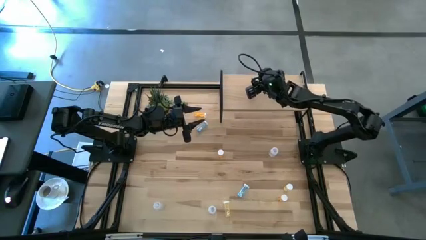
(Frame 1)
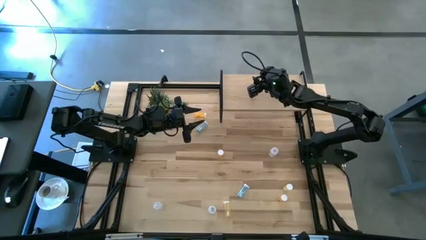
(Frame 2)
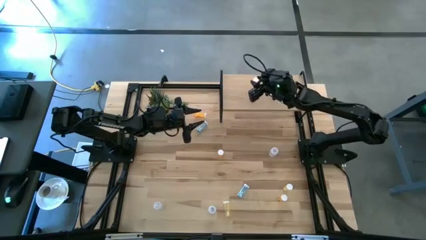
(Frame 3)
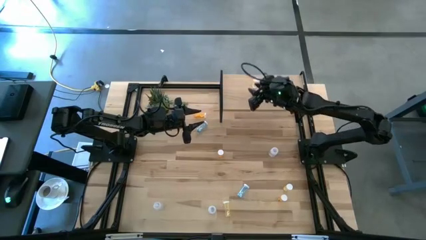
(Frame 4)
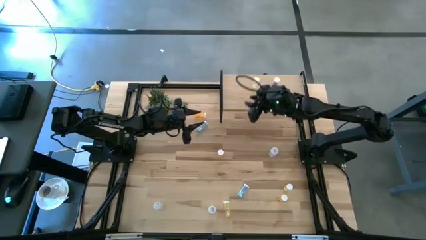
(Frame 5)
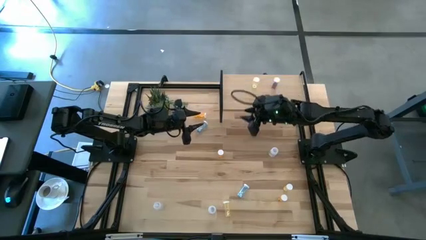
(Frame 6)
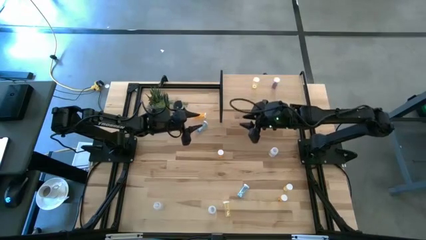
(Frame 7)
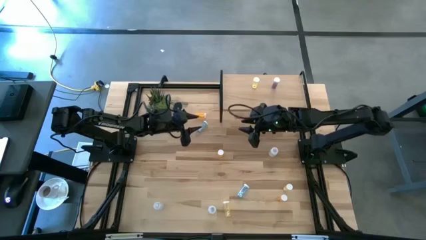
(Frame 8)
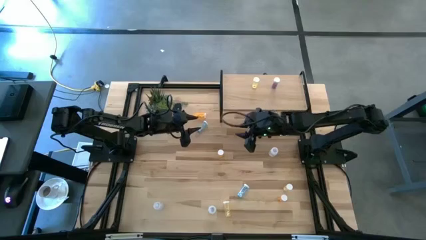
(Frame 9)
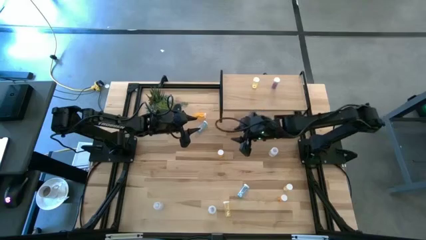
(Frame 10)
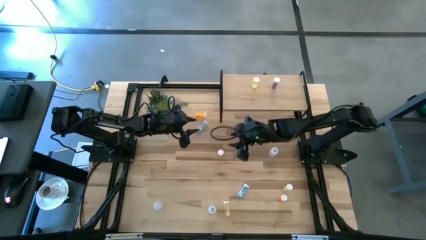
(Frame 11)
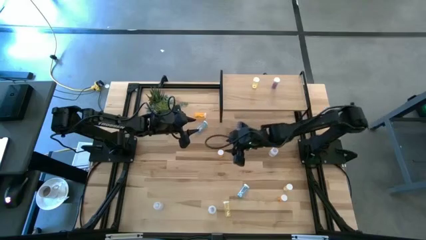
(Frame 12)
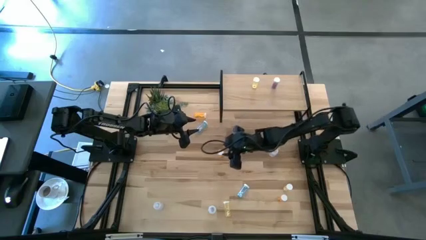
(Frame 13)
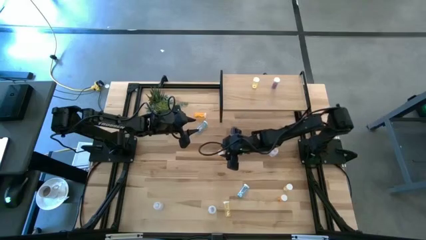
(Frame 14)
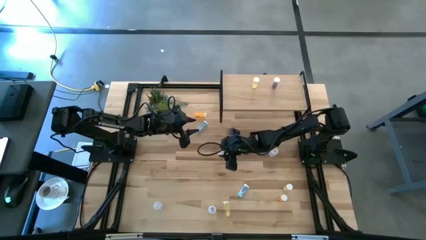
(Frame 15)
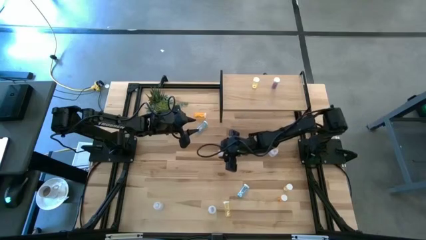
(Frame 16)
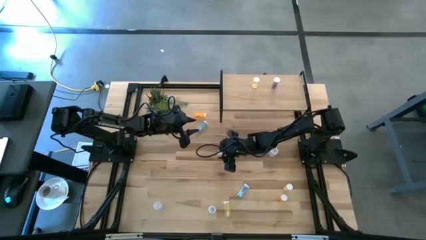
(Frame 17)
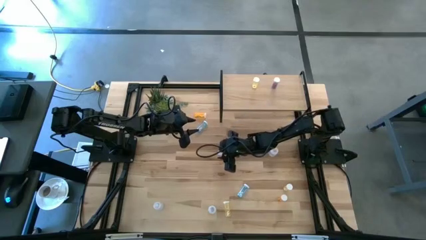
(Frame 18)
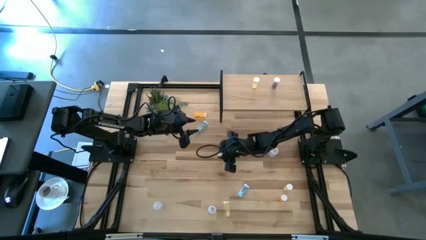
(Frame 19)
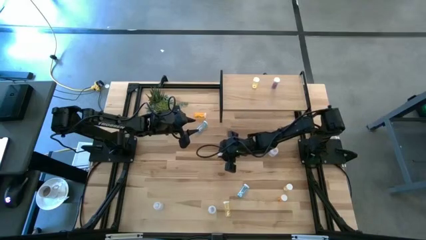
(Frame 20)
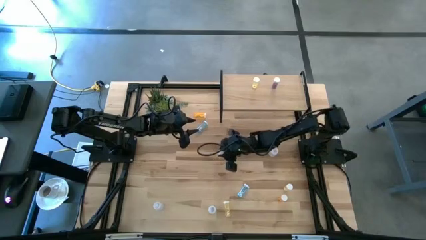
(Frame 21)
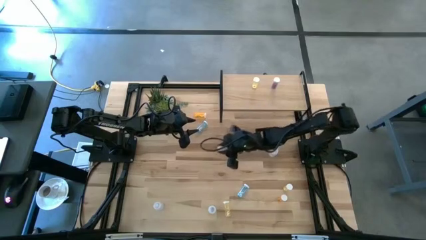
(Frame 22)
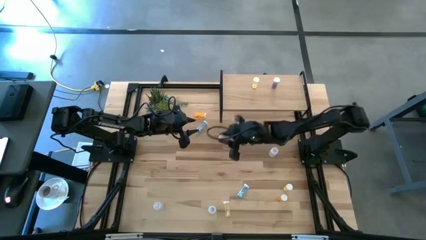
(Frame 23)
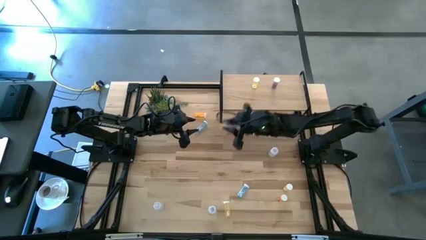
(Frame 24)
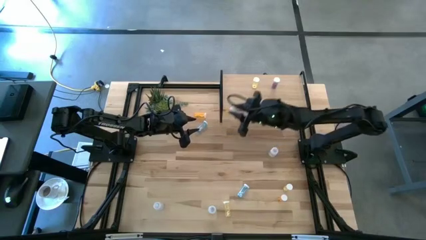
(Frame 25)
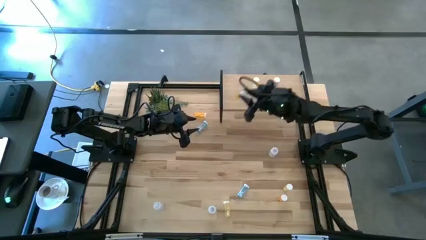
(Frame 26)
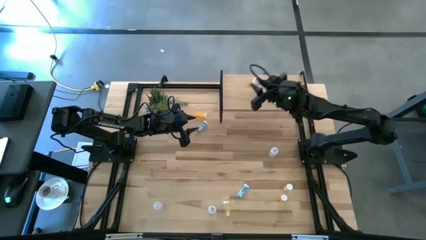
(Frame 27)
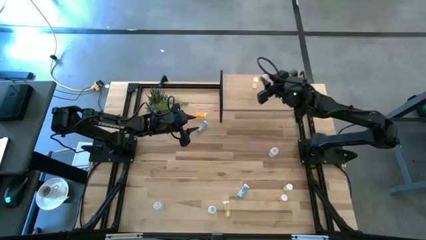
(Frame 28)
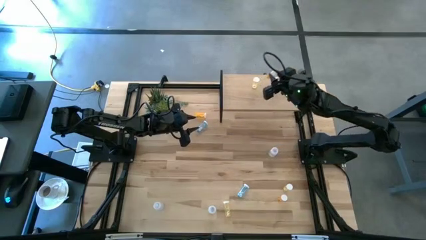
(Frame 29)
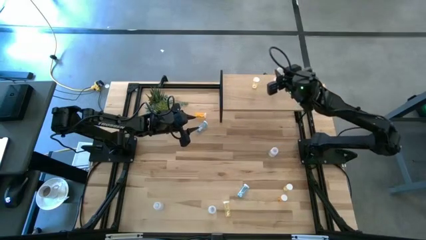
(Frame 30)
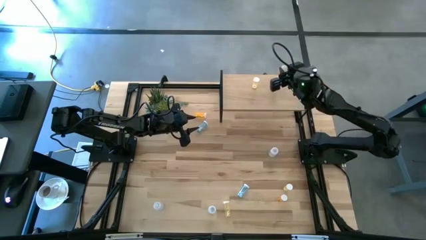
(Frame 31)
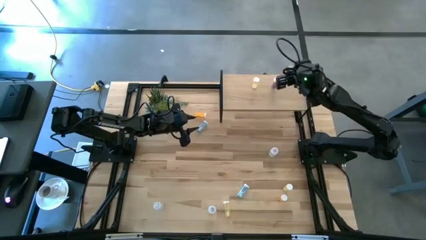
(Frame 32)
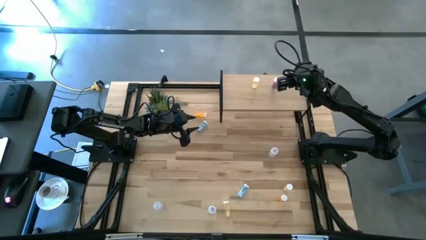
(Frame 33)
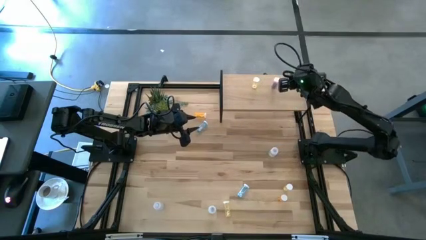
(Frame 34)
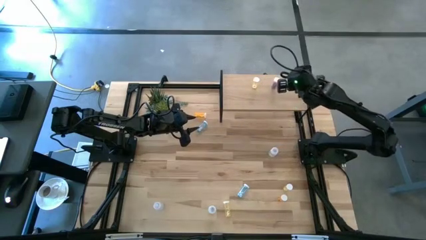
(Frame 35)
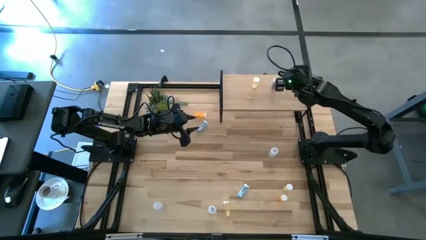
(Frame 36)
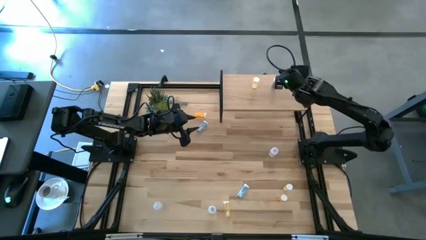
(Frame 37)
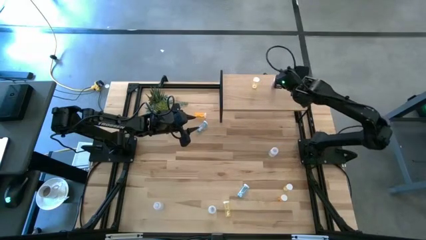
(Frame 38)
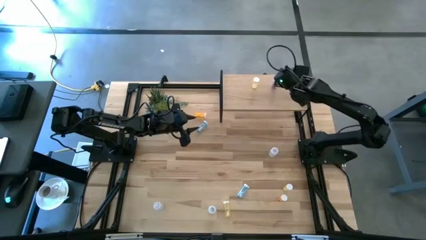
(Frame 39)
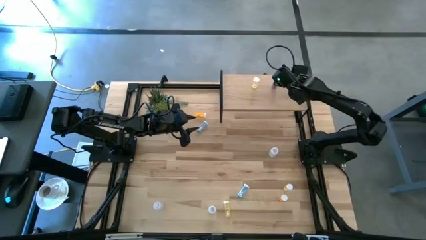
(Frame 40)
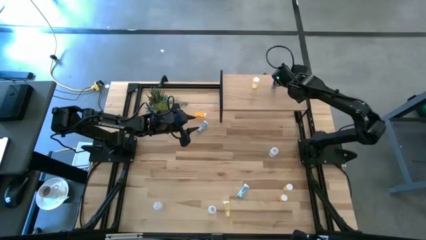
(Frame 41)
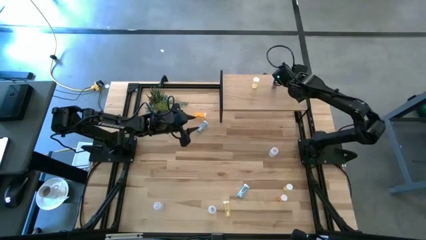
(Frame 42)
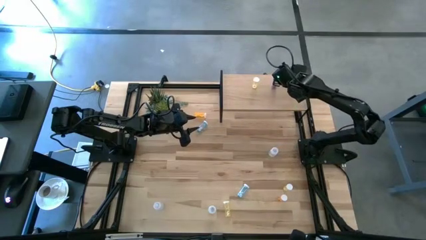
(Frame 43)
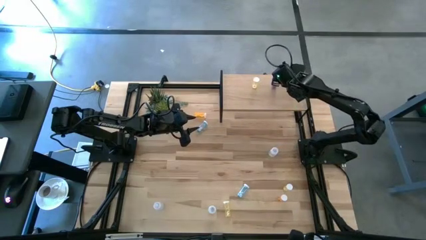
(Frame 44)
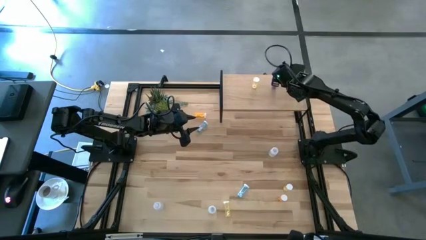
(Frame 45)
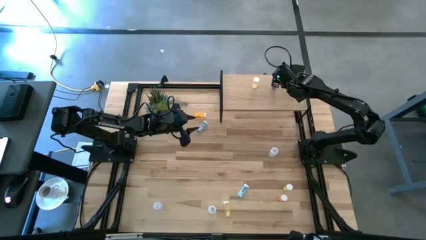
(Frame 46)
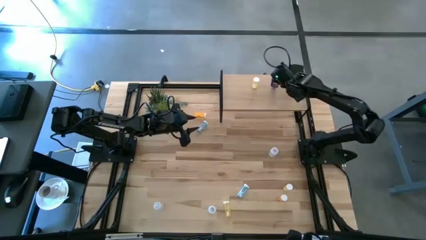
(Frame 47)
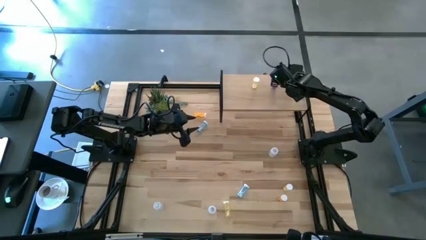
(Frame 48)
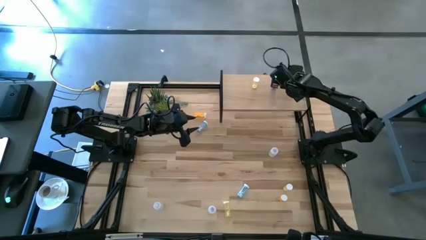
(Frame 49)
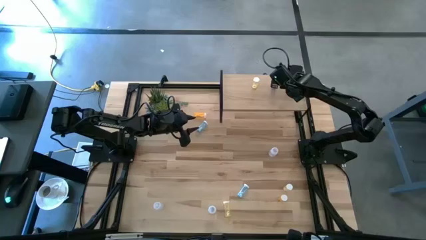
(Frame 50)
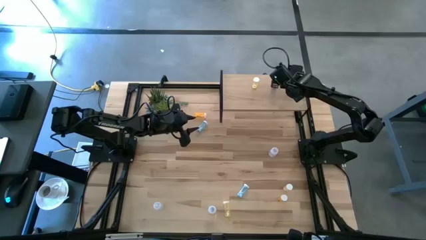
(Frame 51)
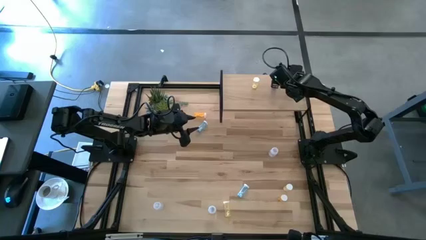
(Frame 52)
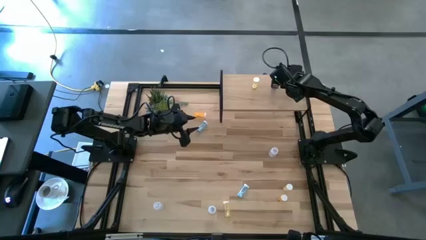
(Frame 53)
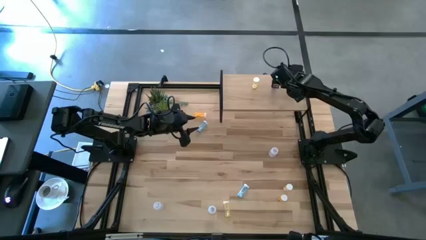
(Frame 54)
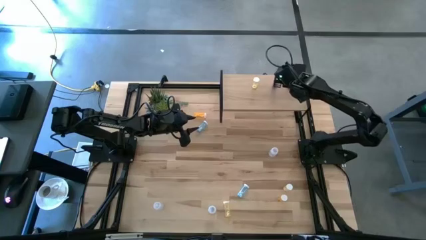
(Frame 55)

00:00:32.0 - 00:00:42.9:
Task: Pick and place medicine bottles onto shelf by color
Put the middle orange pill bottle on the shelf

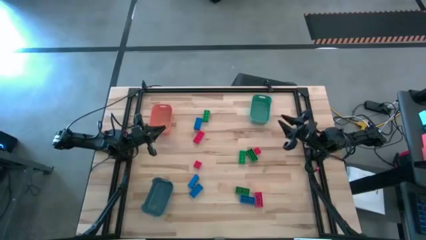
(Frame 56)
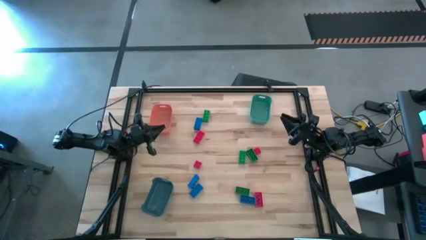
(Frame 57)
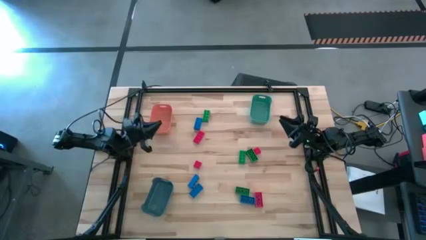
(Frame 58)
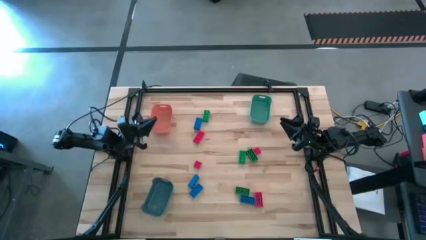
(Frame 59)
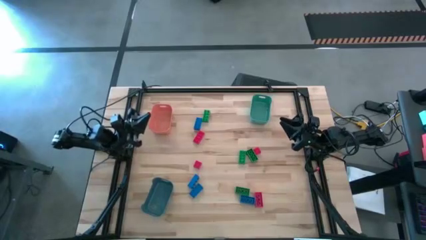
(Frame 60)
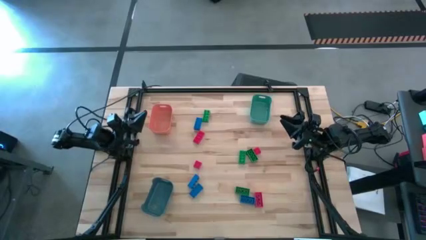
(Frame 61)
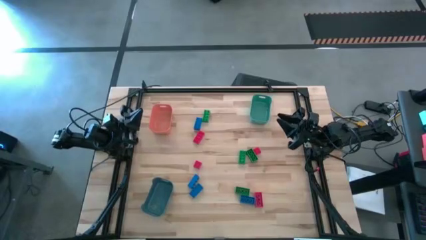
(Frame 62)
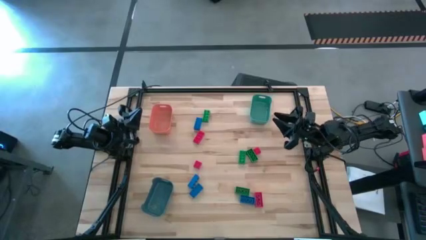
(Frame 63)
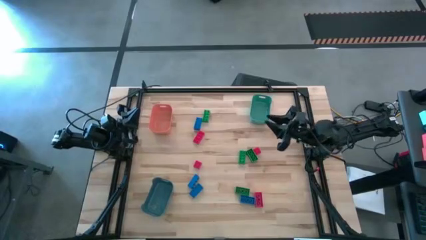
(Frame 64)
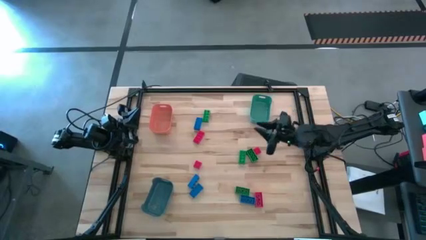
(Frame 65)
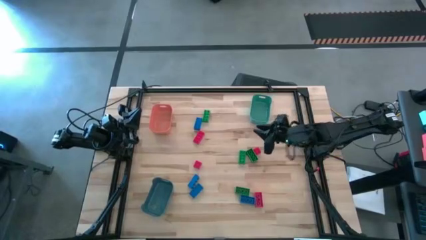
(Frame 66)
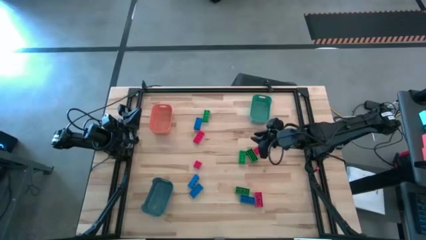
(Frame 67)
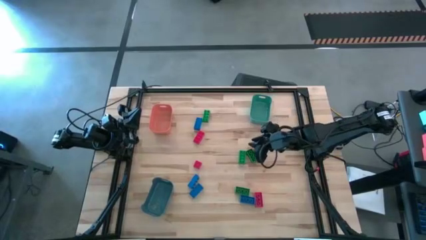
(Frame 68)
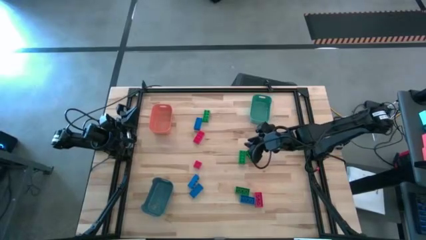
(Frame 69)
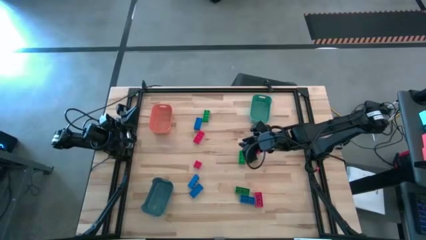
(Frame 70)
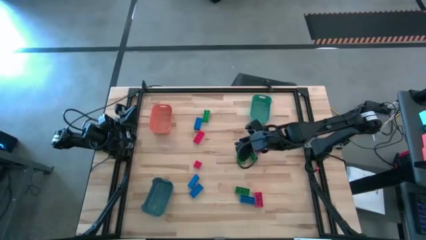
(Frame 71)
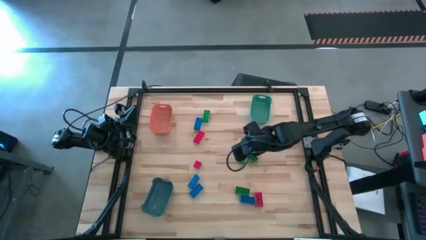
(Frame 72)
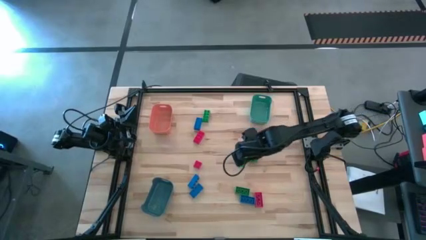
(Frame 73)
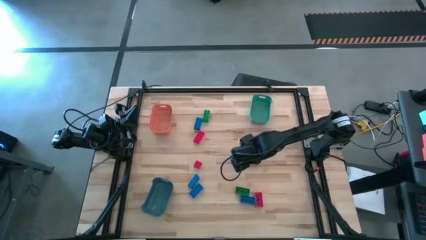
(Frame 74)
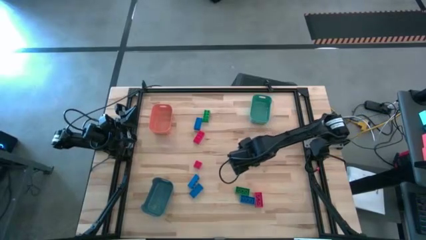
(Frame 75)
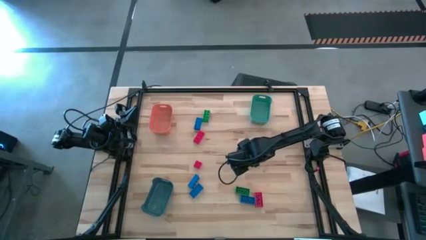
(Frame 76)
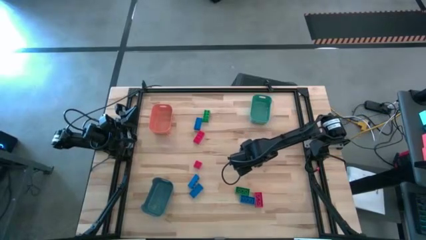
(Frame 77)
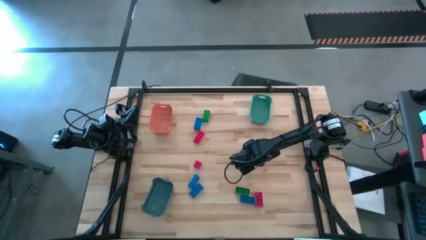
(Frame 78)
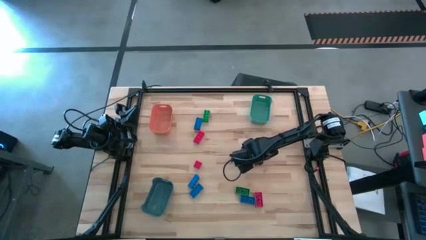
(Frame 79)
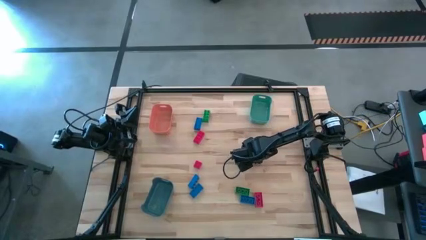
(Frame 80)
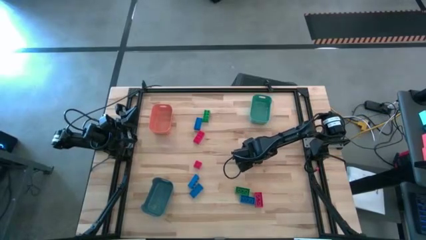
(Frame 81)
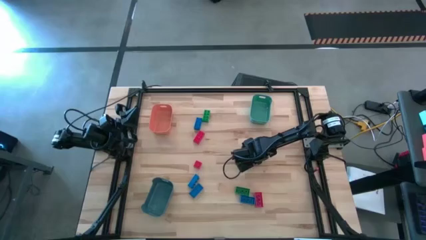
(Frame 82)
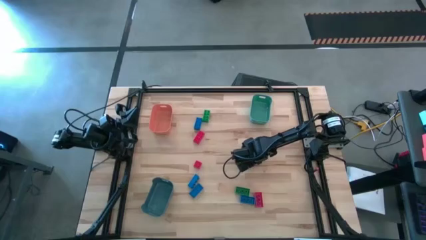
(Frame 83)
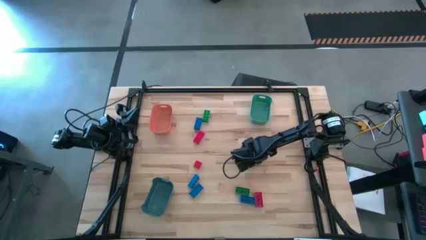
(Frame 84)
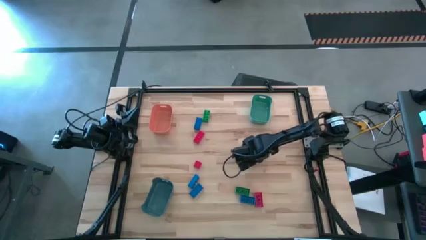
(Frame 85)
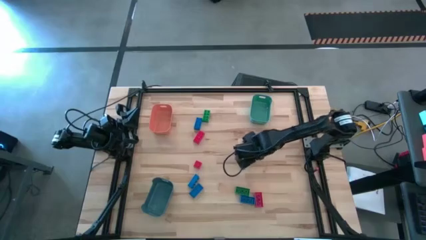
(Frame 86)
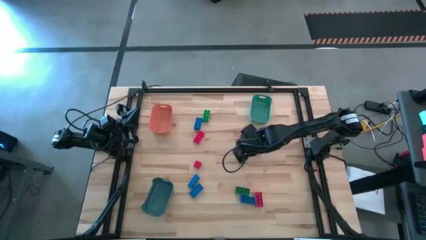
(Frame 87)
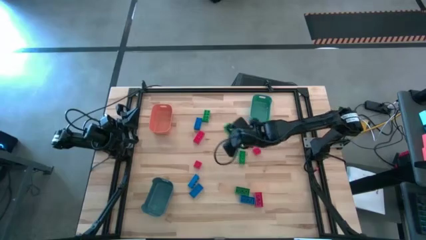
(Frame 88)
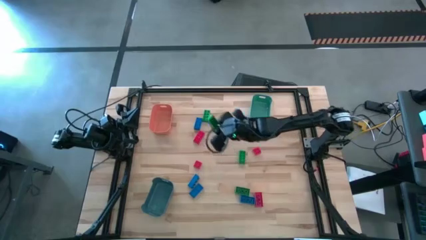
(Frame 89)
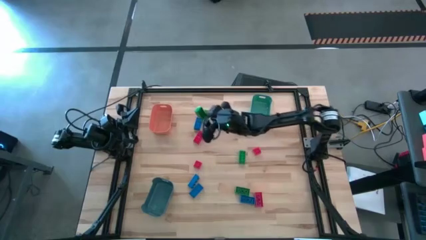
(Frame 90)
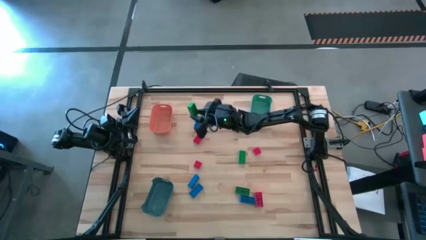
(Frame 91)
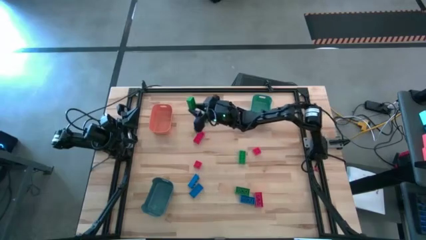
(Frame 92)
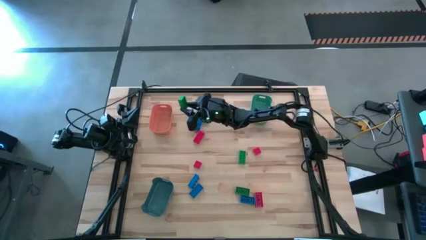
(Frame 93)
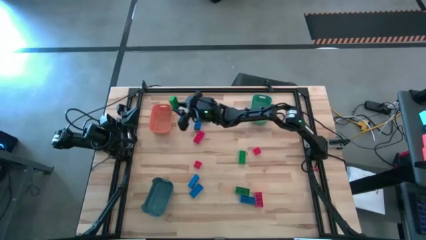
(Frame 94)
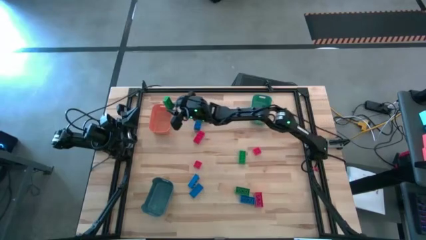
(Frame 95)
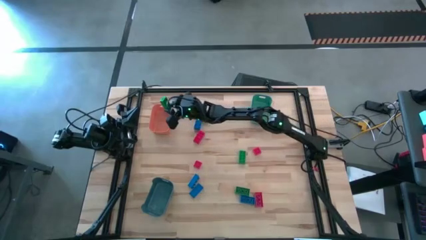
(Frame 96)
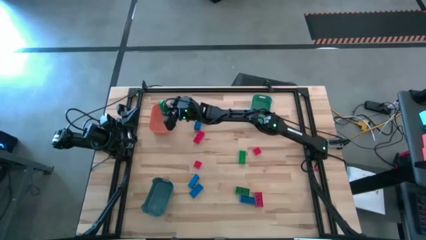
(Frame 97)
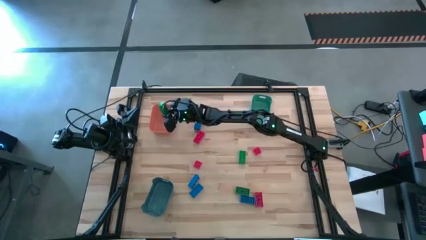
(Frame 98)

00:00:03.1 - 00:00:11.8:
Task: Sort & place blocks by color
Put the green game piece into the orange bin
